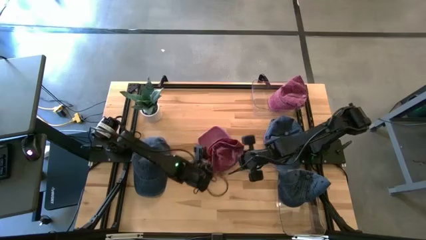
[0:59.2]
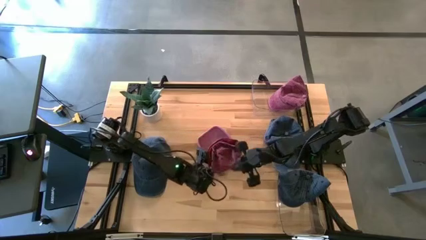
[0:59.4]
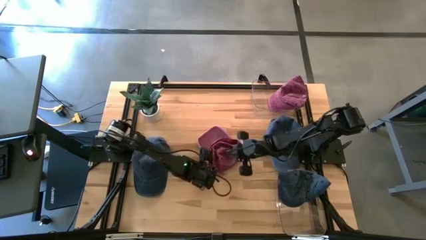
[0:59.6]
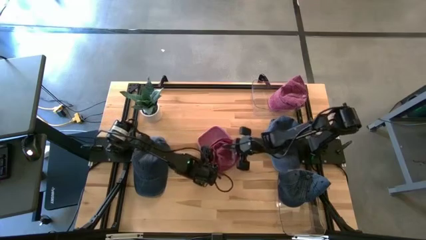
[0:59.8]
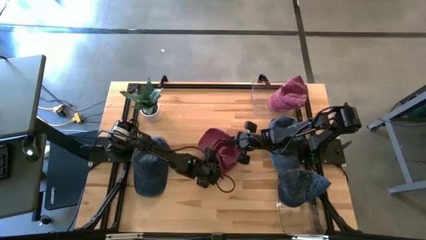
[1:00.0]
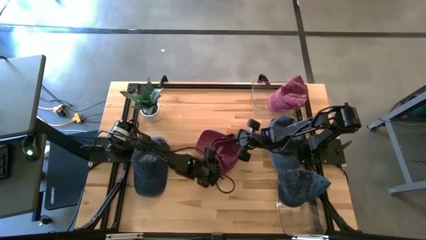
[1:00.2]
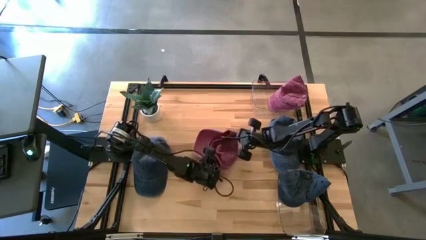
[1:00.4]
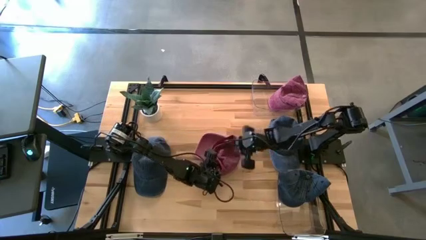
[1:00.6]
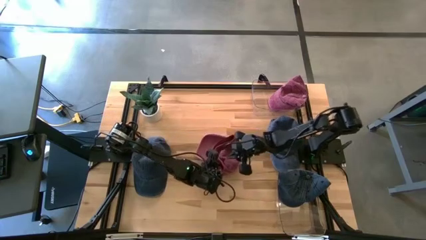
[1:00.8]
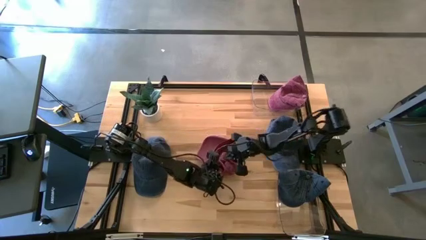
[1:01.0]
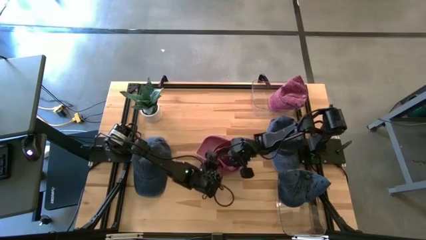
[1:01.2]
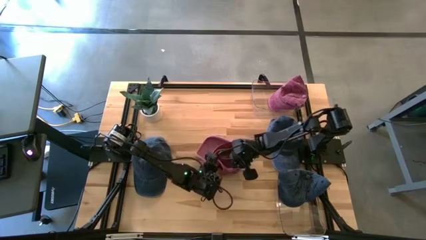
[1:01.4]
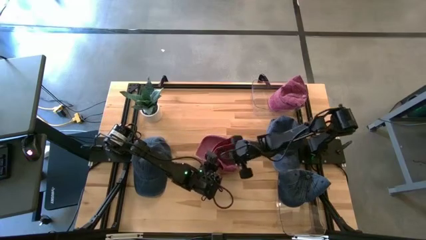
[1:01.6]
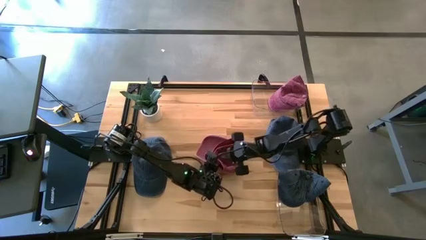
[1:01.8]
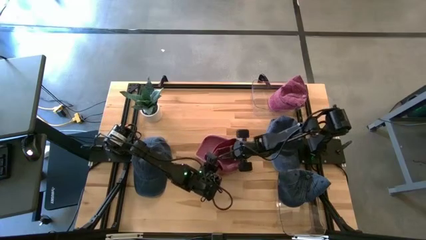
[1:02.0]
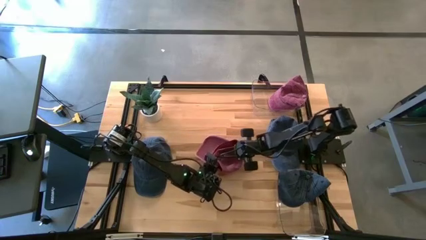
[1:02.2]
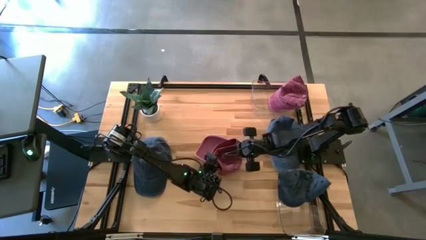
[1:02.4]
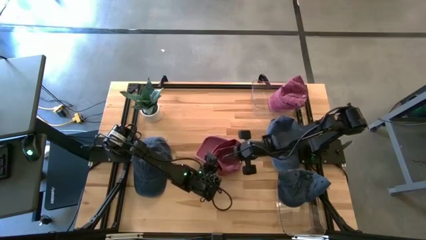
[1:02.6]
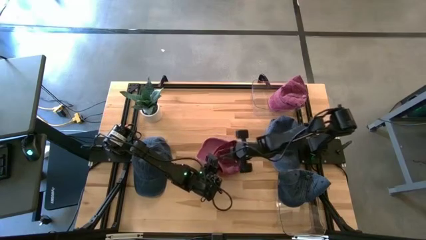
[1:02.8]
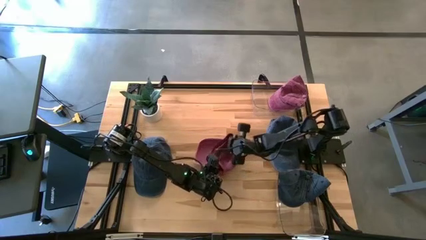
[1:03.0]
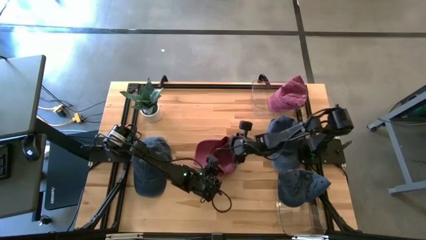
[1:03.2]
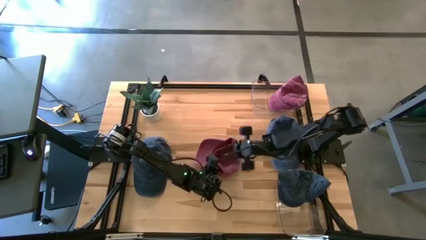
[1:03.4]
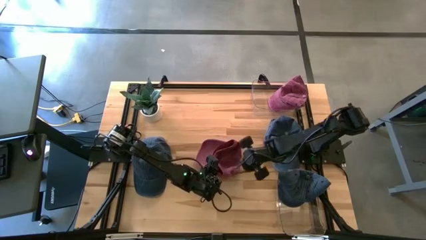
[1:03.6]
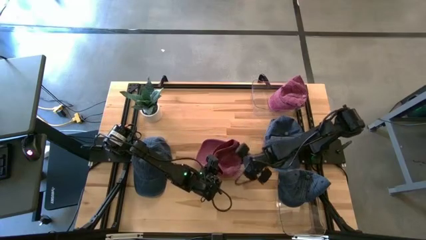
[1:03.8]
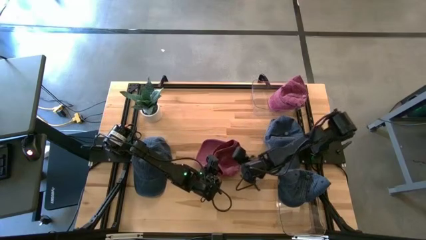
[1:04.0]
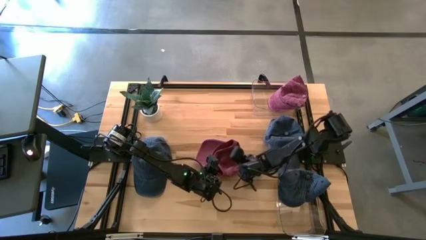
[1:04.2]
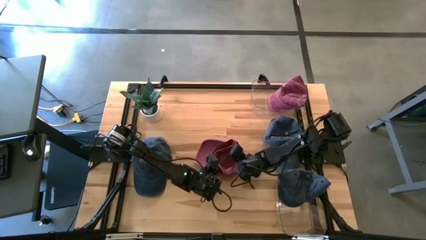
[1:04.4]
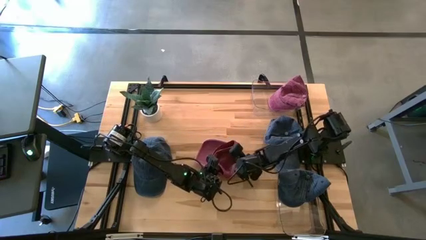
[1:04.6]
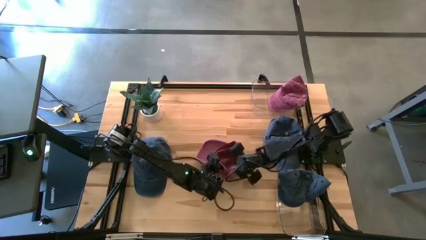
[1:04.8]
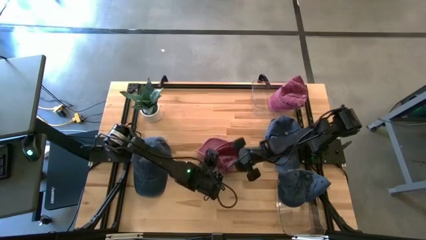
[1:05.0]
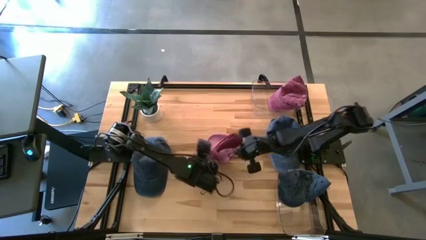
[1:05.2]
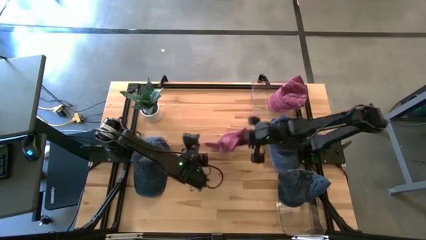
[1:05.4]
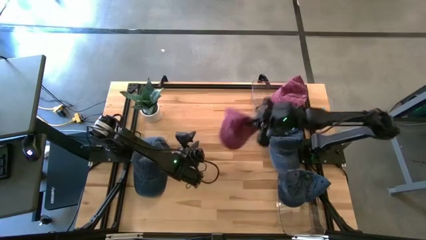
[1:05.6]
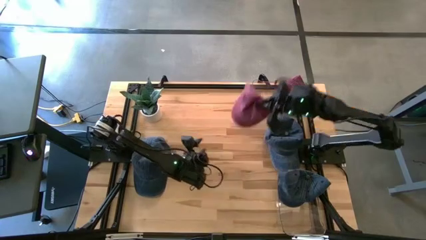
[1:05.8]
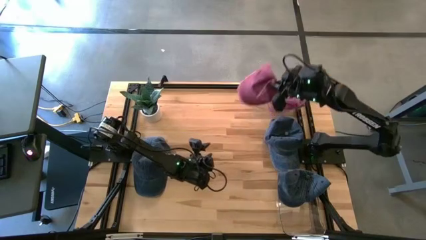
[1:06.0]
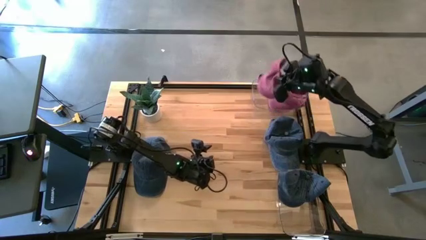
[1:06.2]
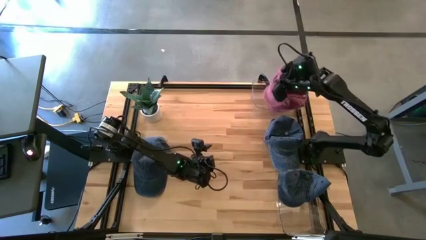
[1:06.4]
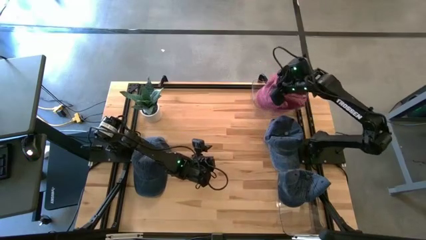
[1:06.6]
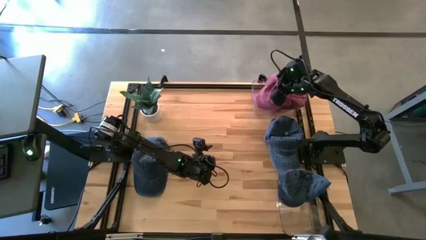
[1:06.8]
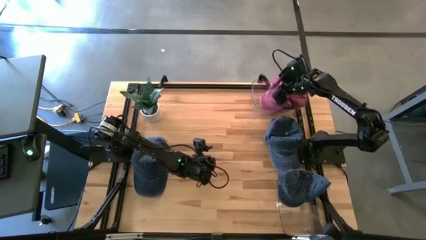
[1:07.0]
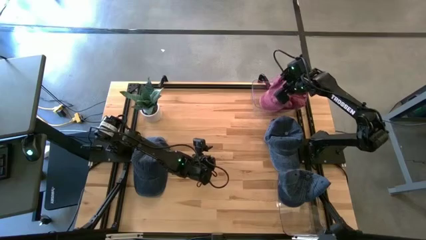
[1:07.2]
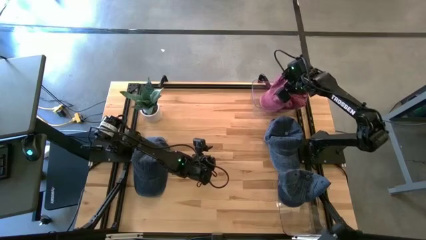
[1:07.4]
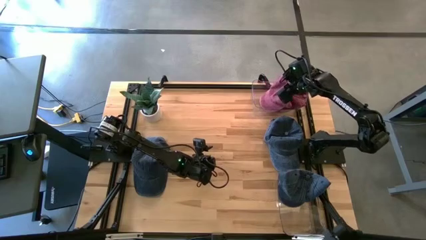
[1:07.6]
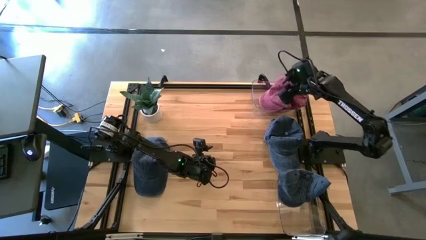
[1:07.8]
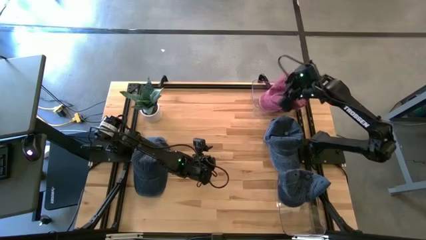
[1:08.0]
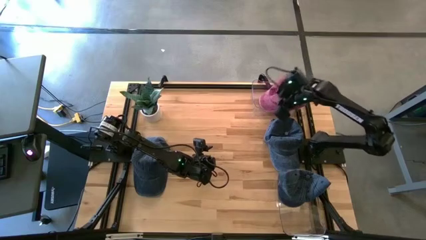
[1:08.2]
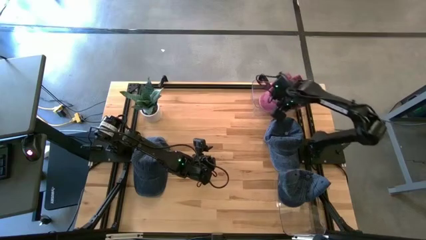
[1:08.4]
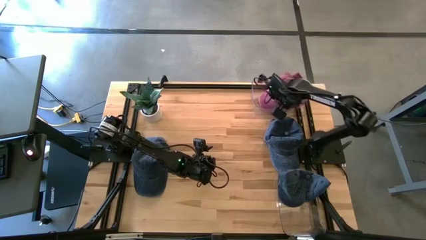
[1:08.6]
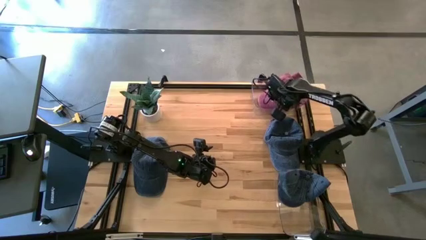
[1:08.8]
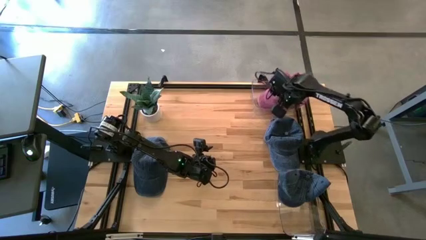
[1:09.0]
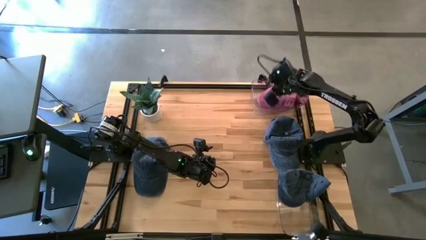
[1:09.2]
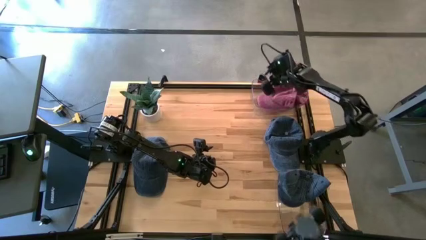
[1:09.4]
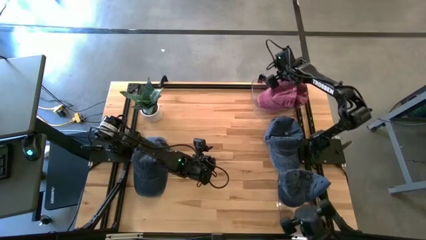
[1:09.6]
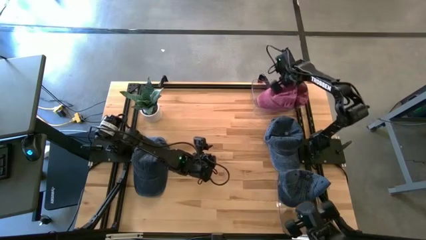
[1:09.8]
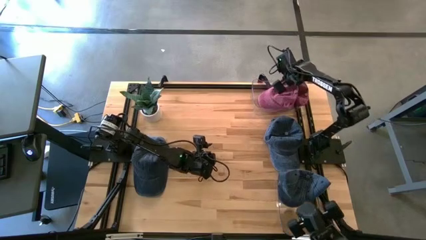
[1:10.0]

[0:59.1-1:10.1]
Task: Pick & Place hat
Put the red cap into the top transparent bin
